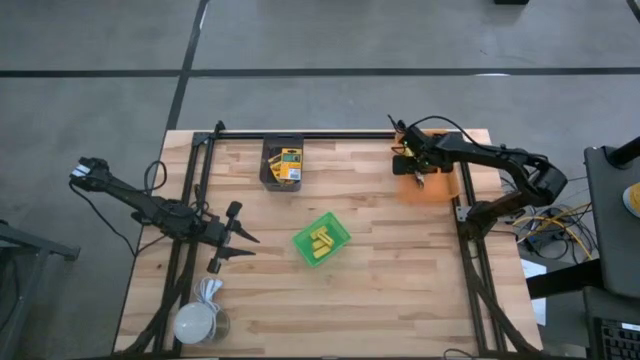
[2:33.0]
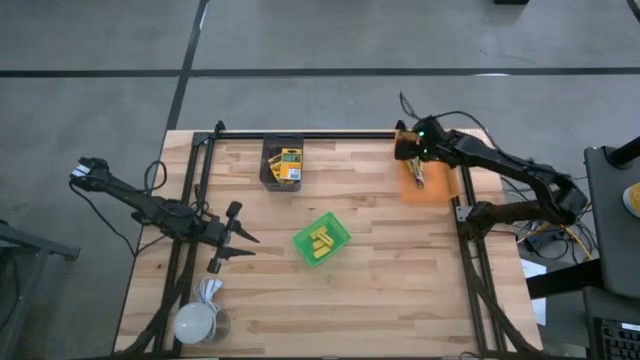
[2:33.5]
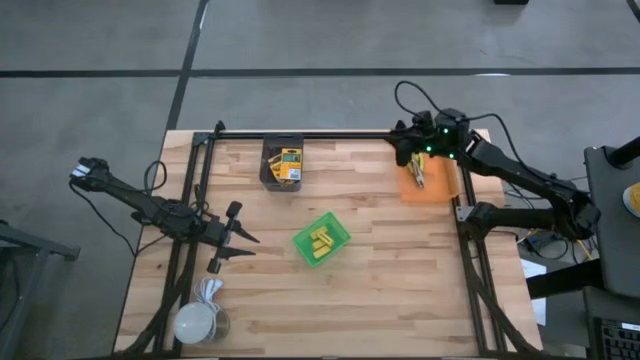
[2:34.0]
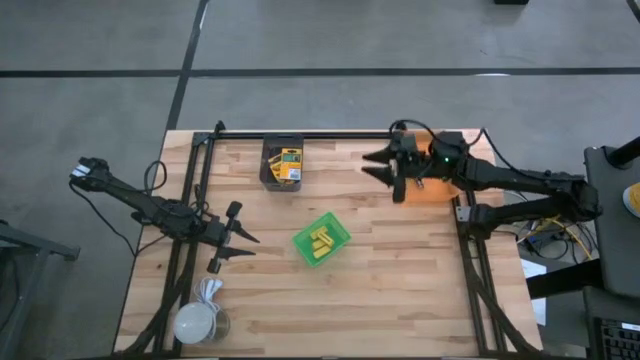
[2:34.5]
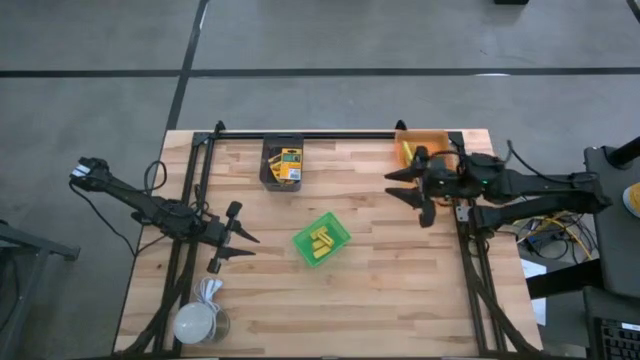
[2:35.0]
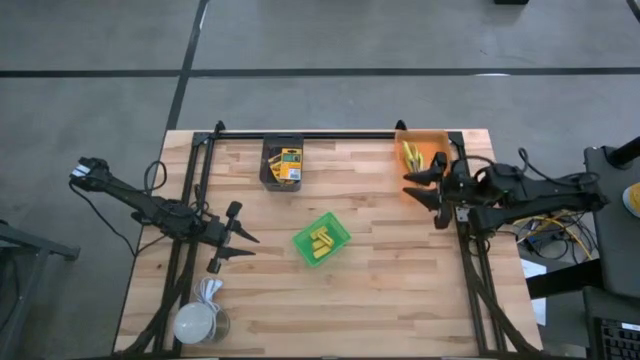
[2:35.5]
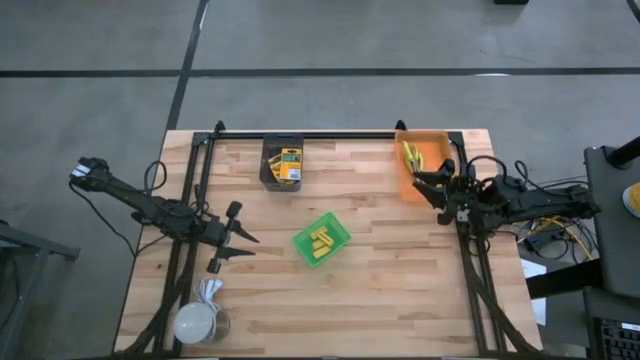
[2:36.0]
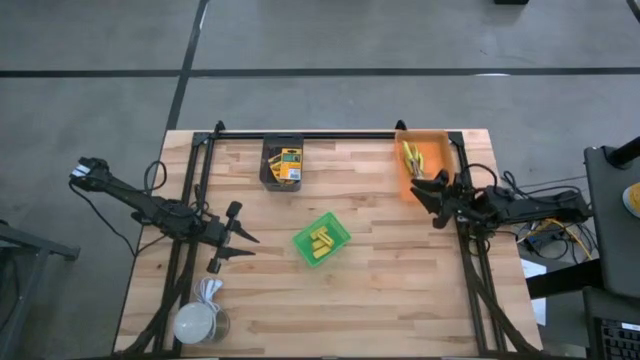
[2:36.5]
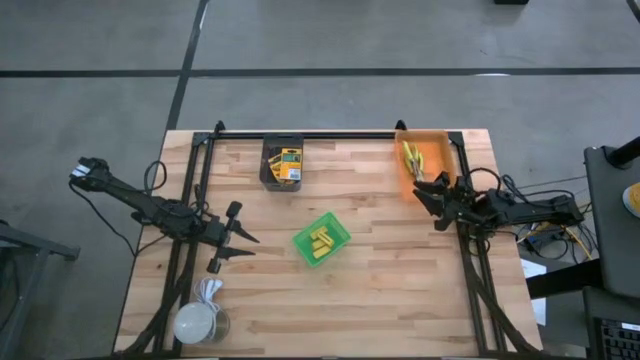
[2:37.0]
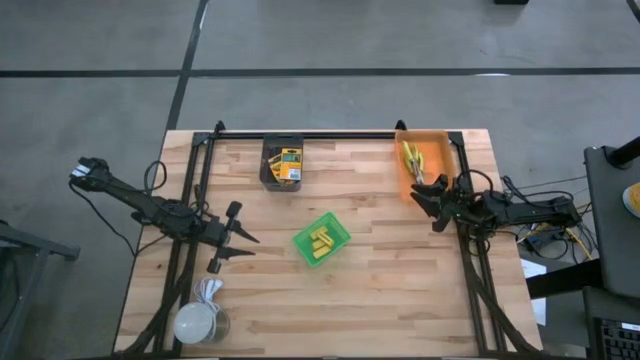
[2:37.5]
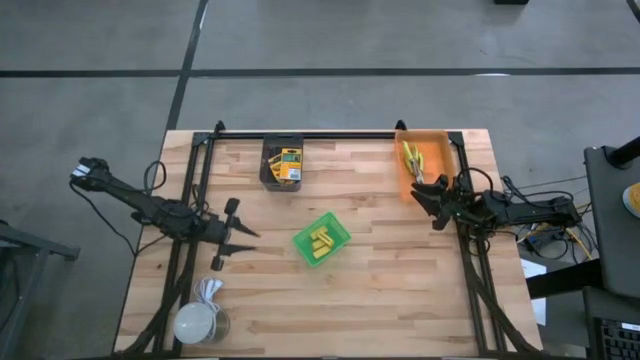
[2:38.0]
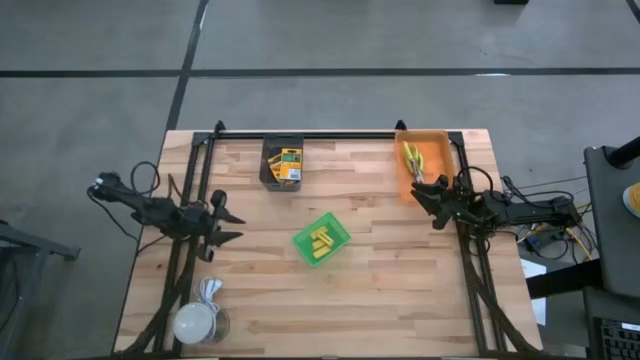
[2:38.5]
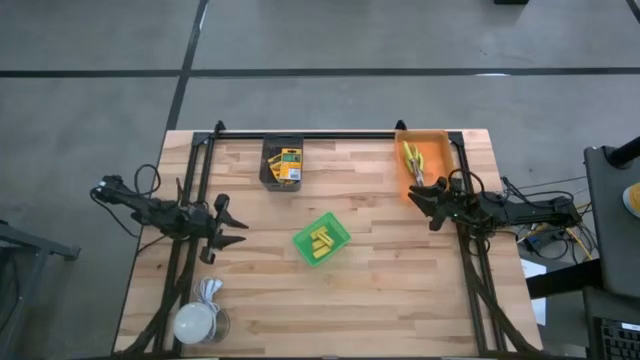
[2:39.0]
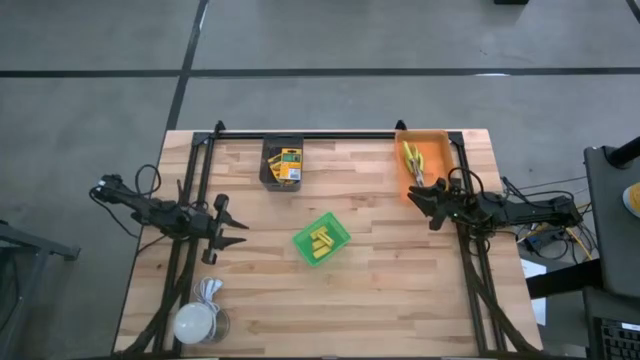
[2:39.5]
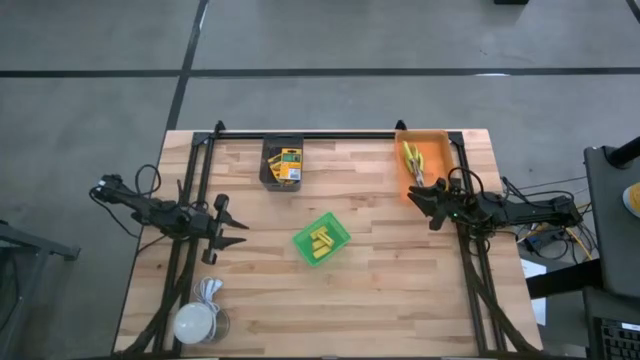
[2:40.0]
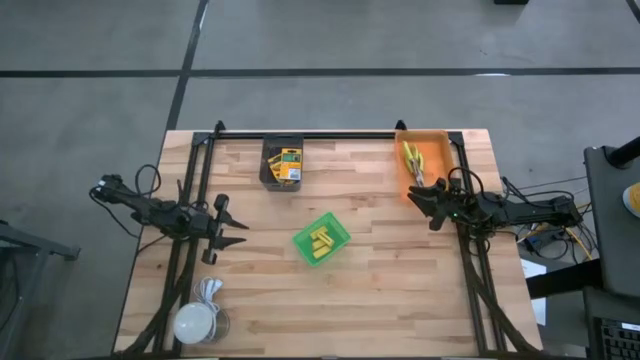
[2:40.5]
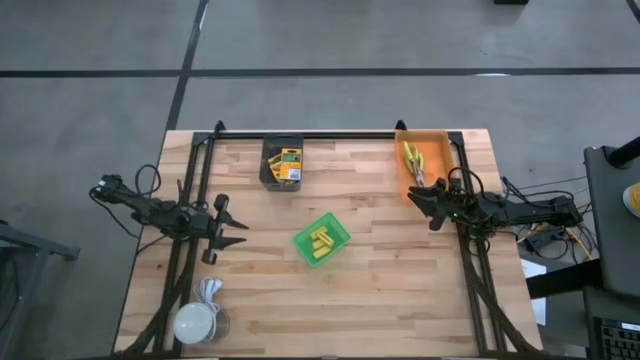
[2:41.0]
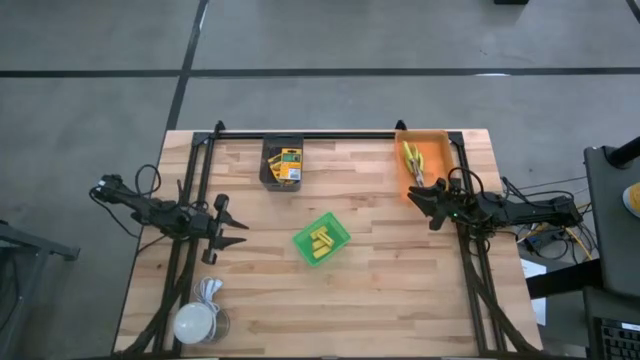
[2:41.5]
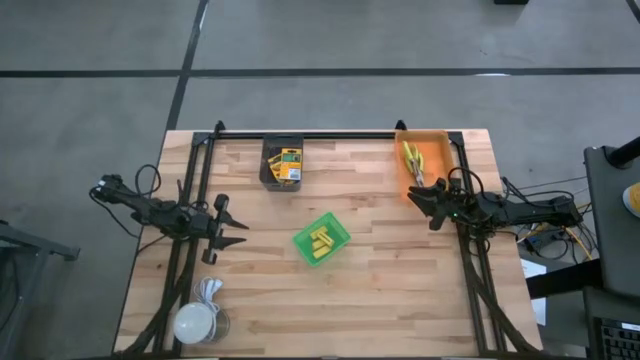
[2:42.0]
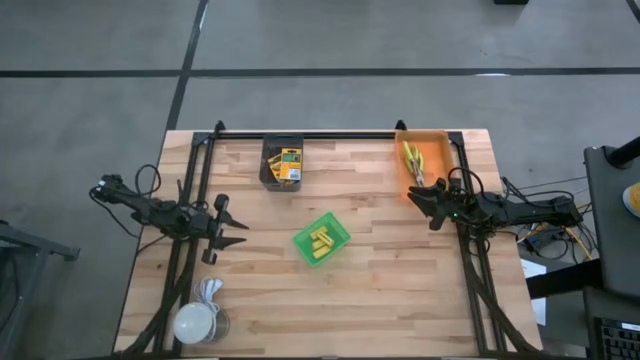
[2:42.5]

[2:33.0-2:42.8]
Task: Pick & Place School Supplies
Return to Home Position

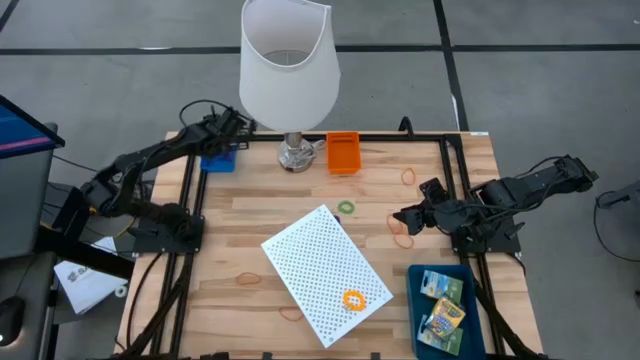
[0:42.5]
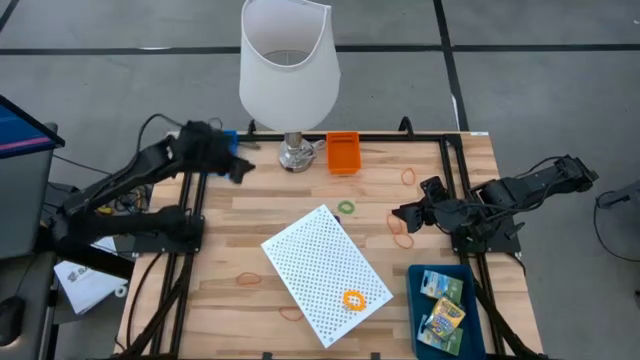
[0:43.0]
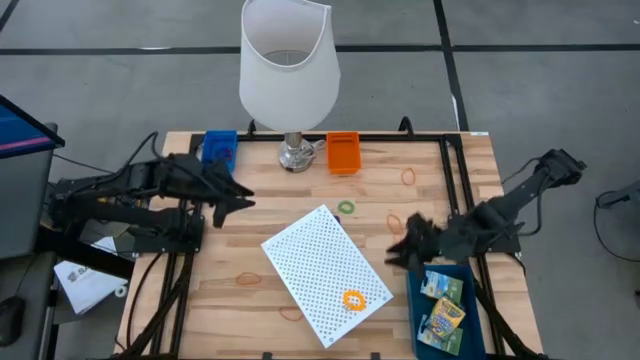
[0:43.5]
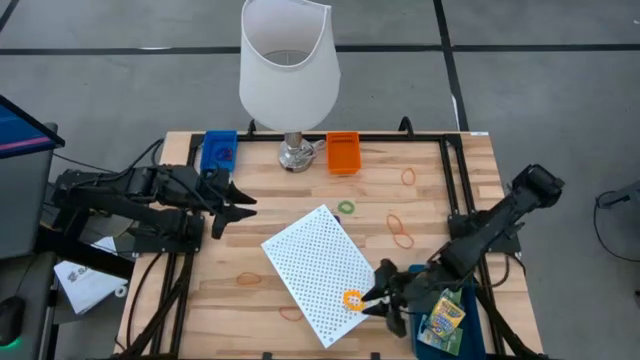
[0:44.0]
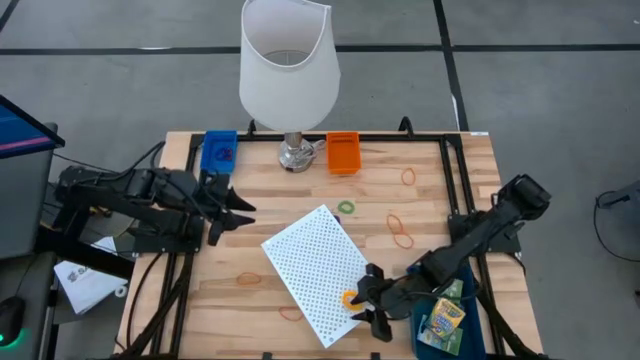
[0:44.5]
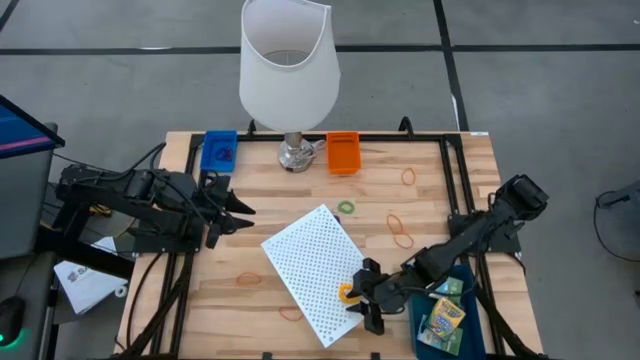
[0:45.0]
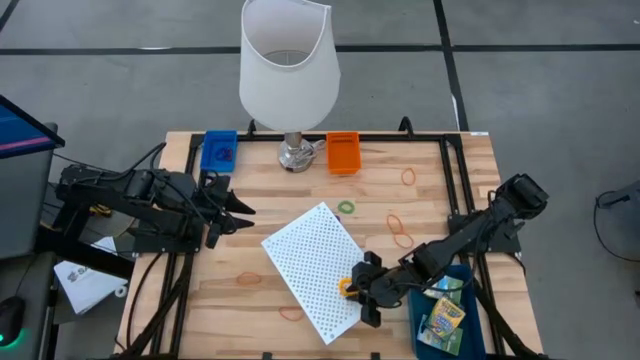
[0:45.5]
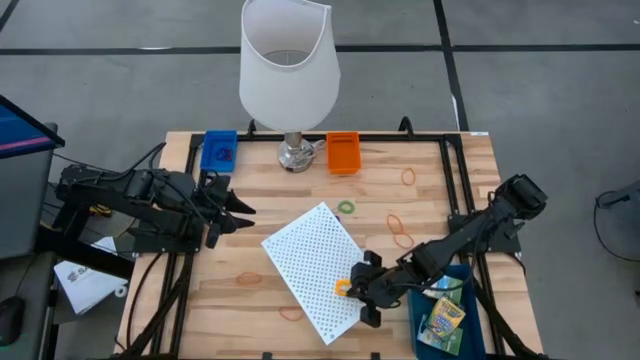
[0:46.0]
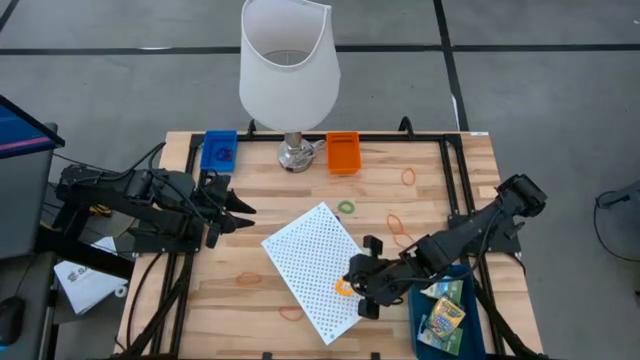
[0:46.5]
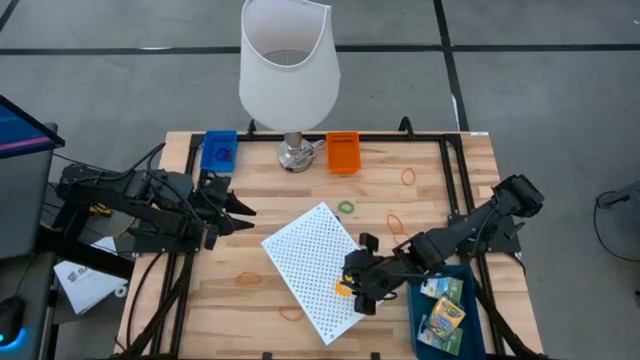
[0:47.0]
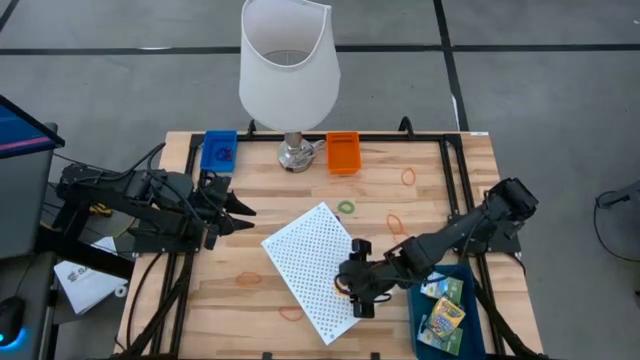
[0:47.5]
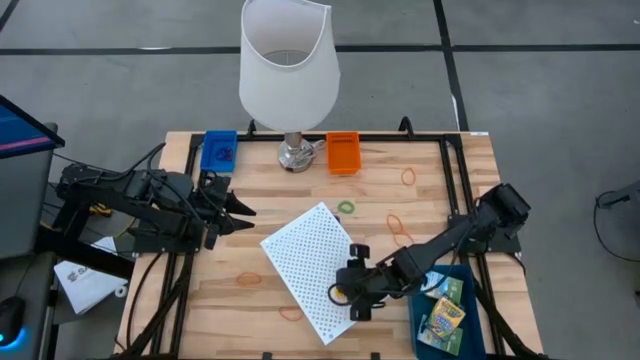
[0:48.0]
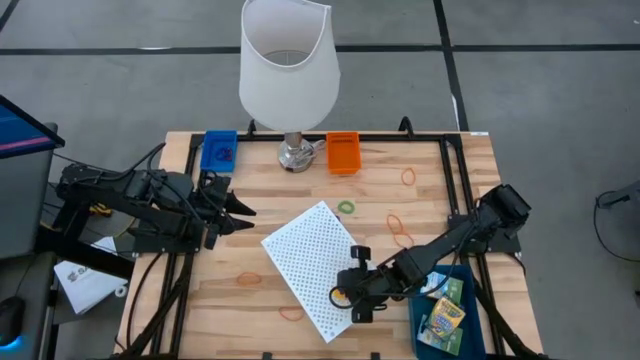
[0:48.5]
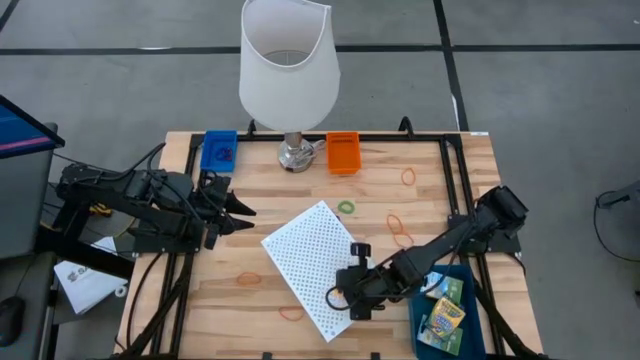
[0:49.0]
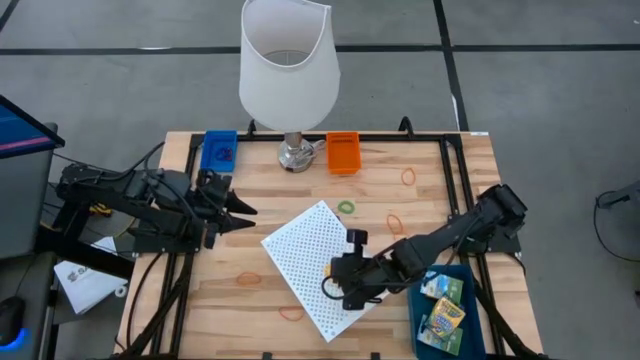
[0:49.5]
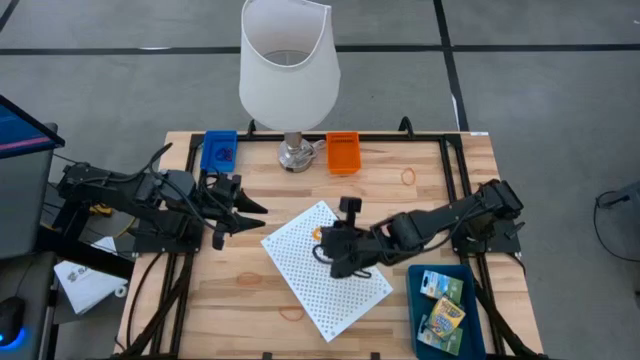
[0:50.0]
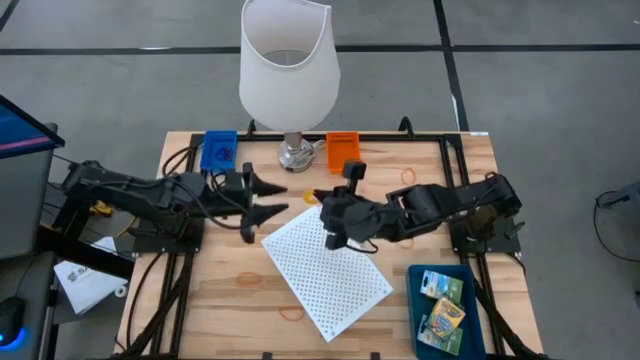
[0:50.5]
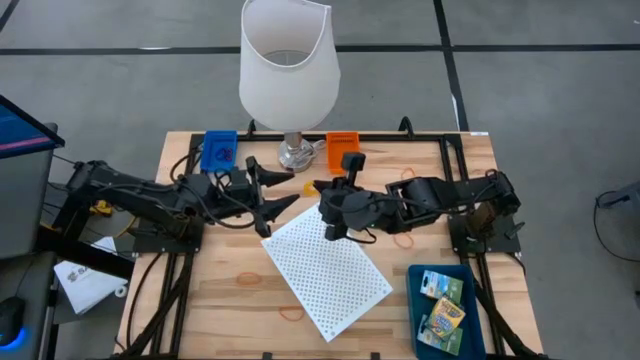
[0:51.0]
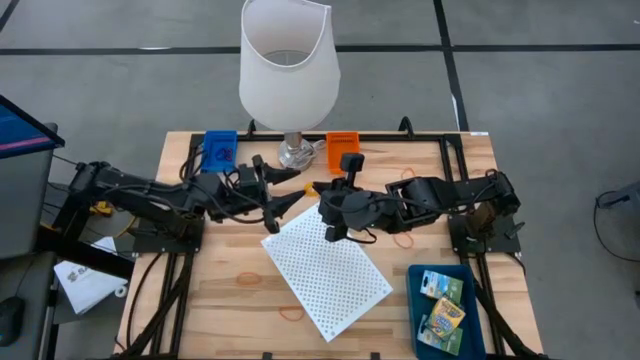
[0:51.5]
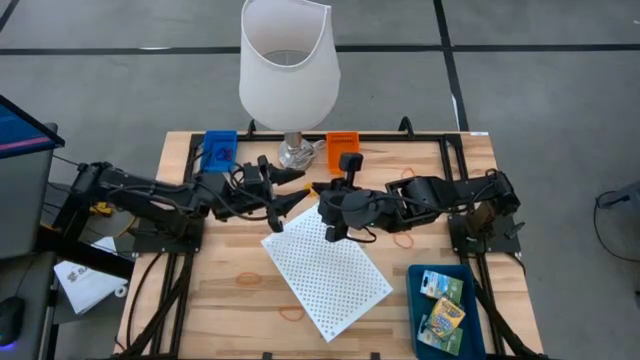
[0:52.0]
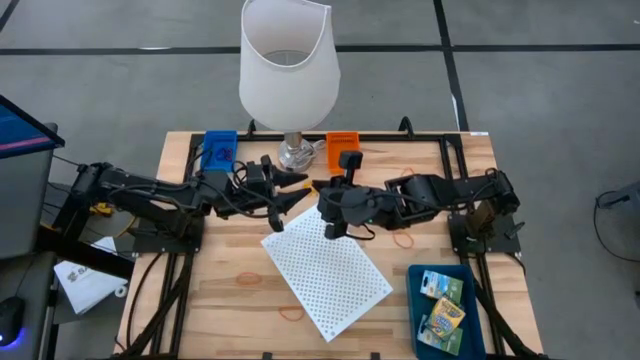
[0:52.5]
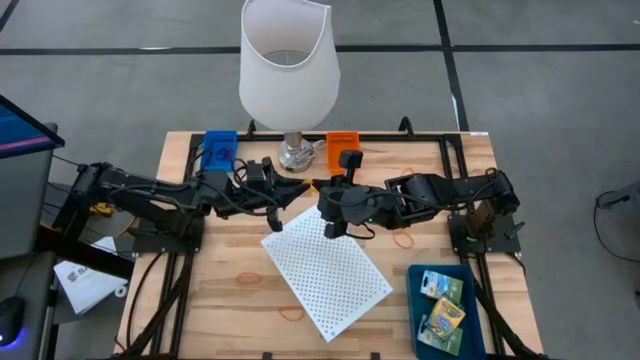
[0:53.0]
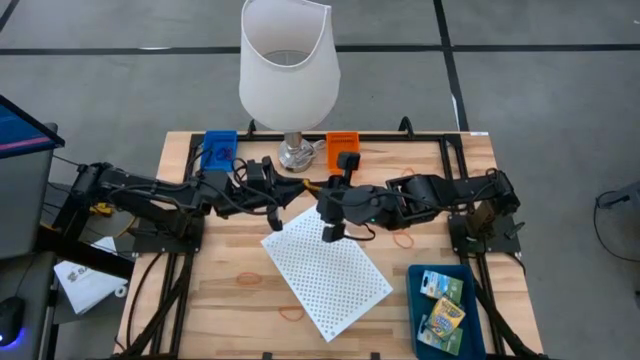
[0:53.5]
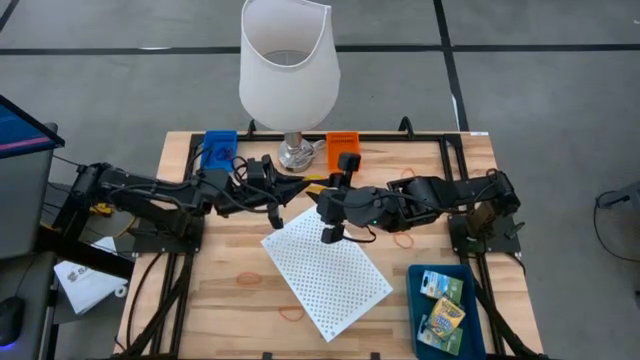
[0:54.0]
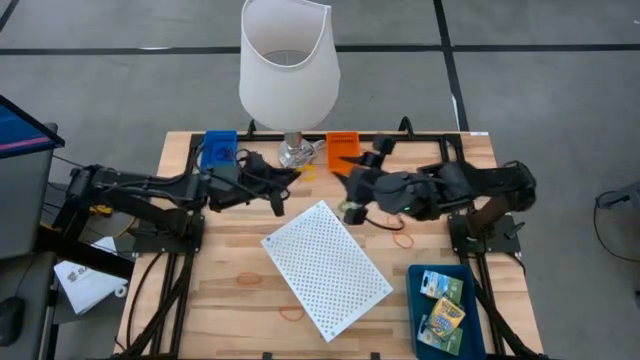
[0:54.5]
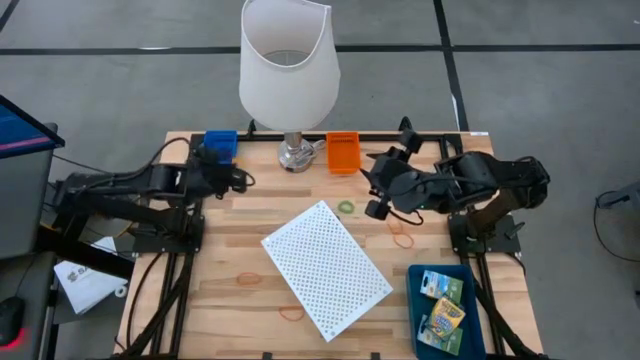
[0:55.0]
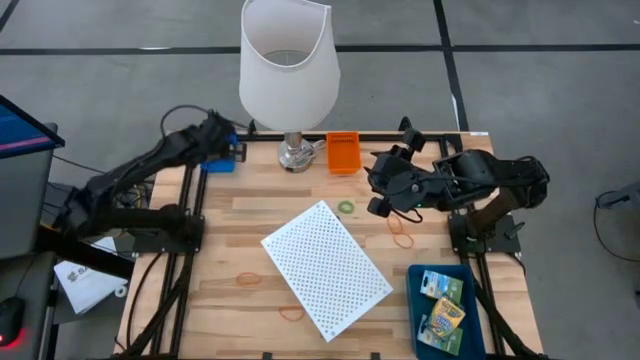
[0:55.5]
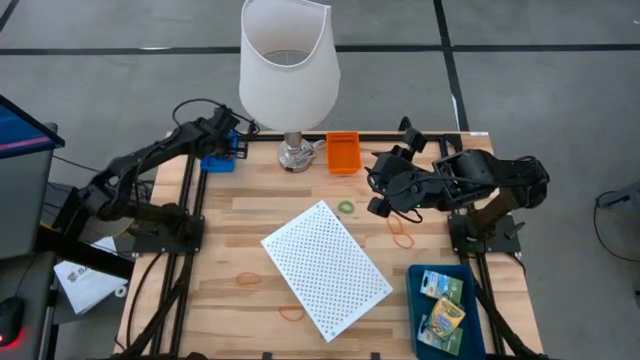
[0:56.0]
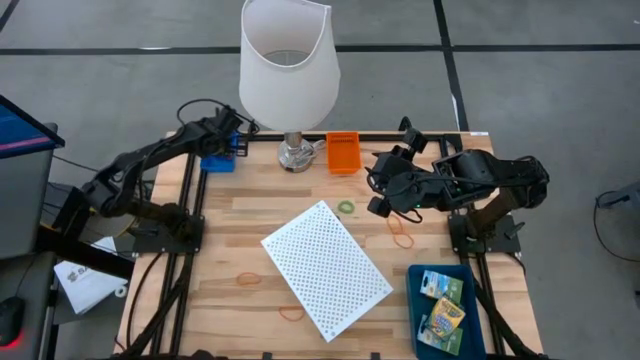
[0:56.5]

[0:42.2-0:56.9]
Task: Pick & Place Office Desk Supplies
Put the yellow spring keychain into the blue bin
